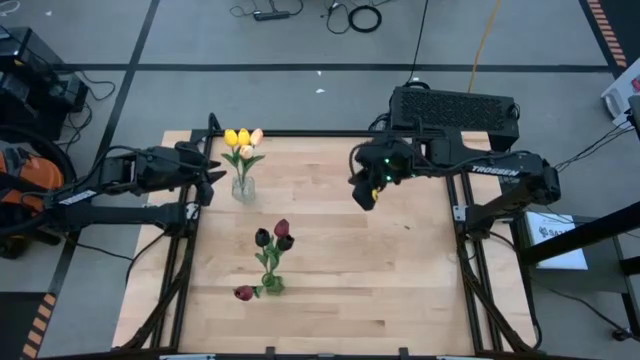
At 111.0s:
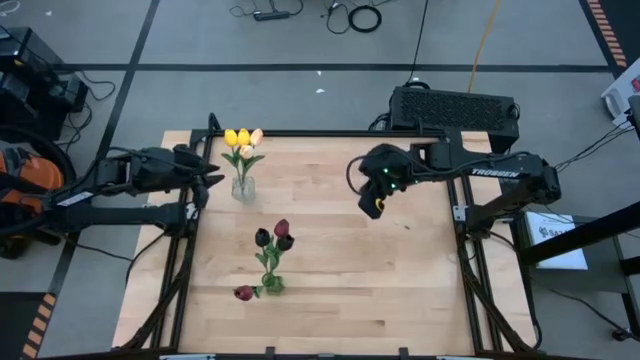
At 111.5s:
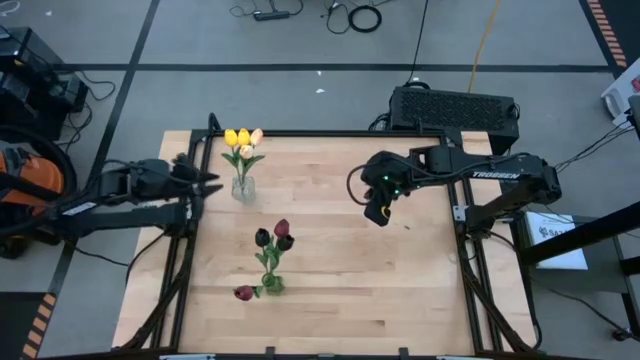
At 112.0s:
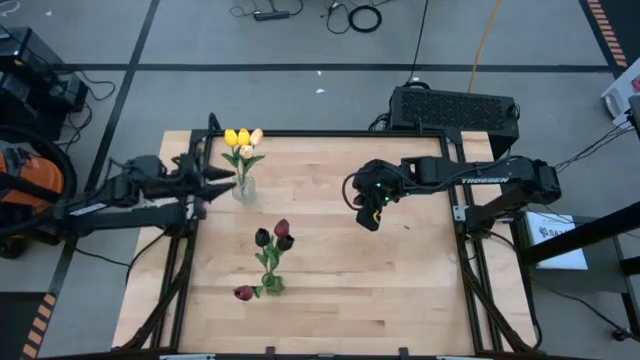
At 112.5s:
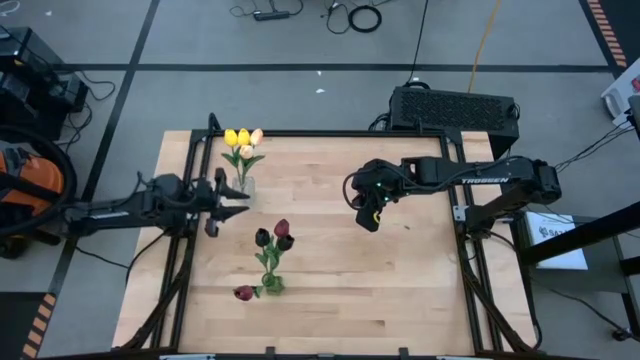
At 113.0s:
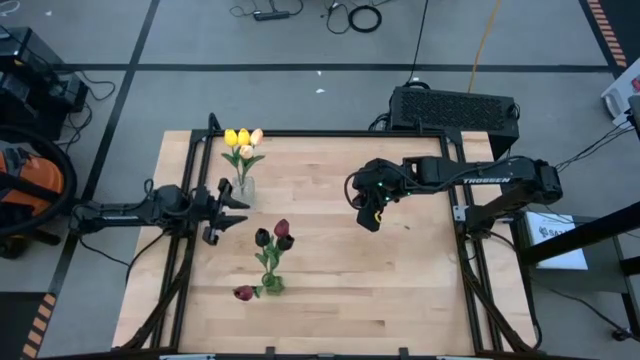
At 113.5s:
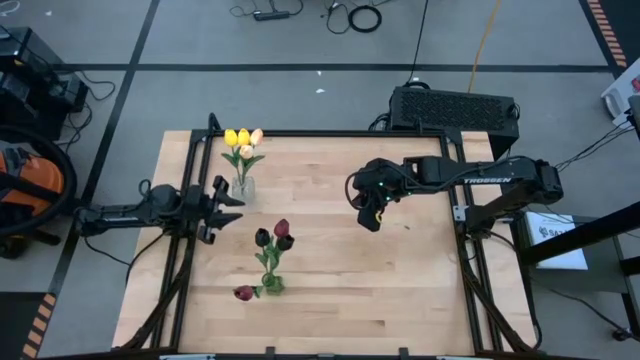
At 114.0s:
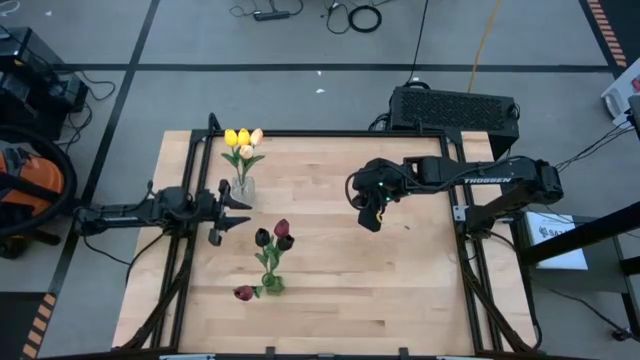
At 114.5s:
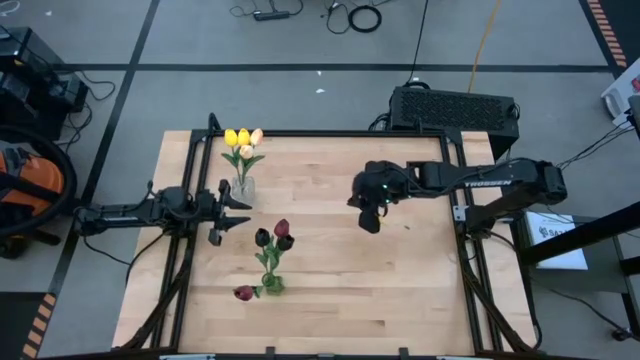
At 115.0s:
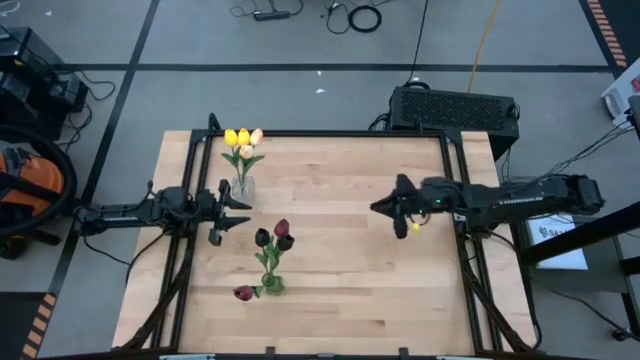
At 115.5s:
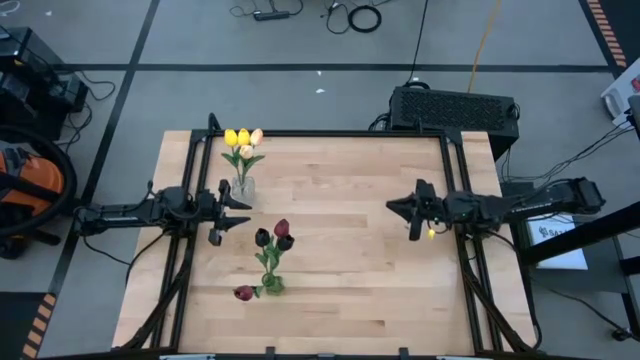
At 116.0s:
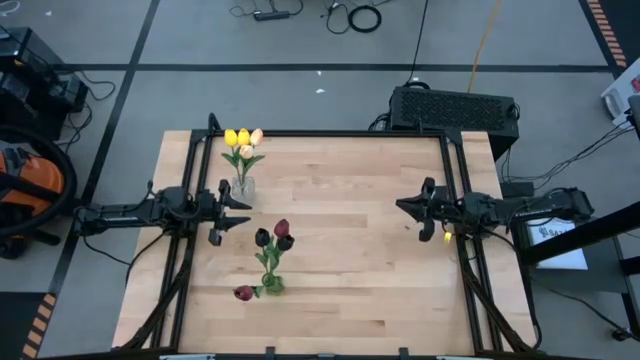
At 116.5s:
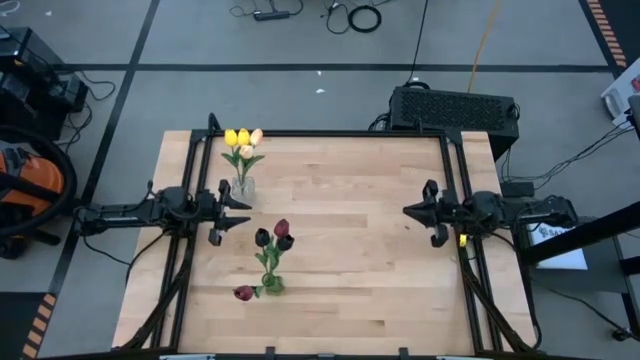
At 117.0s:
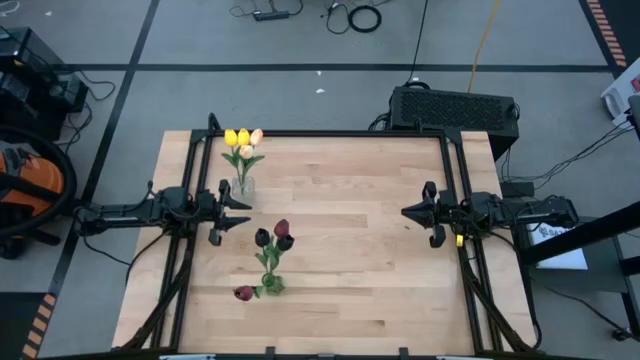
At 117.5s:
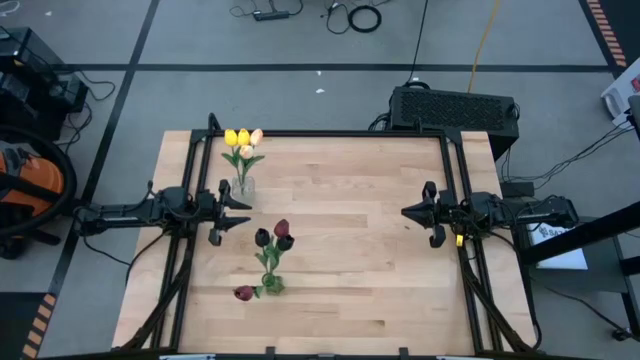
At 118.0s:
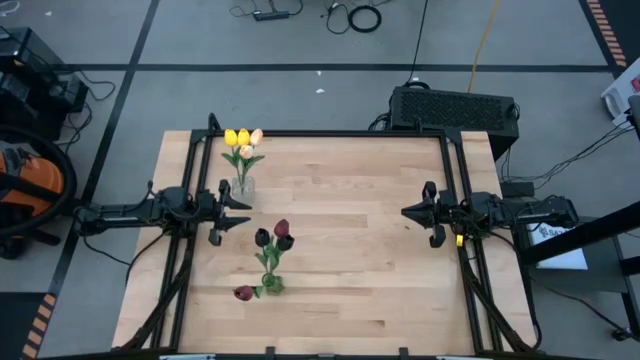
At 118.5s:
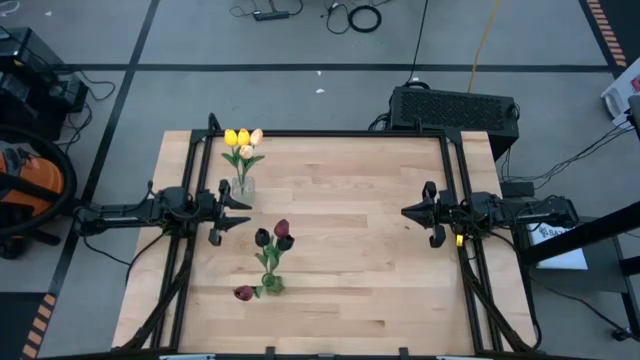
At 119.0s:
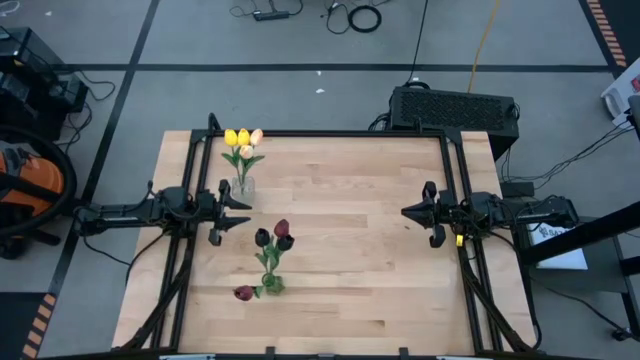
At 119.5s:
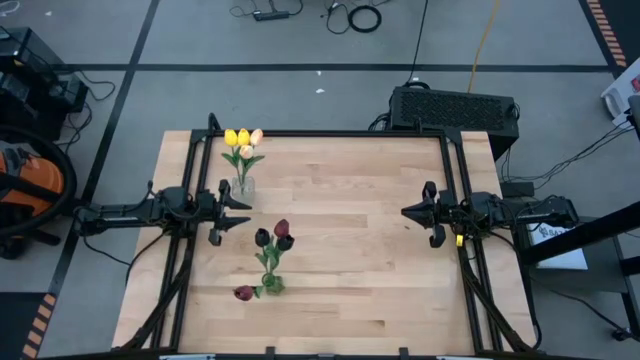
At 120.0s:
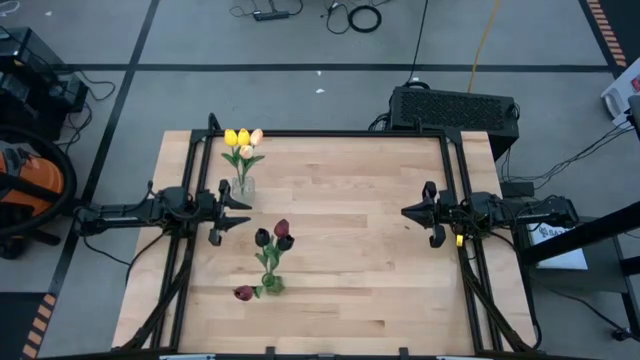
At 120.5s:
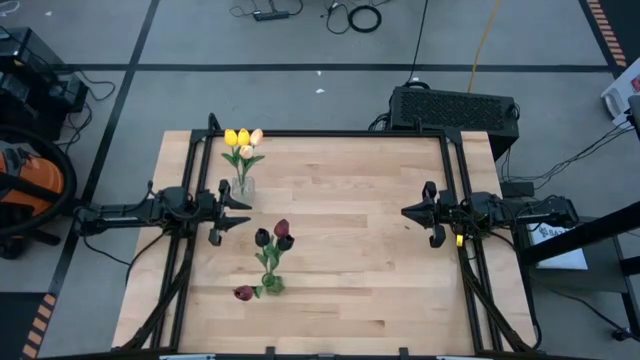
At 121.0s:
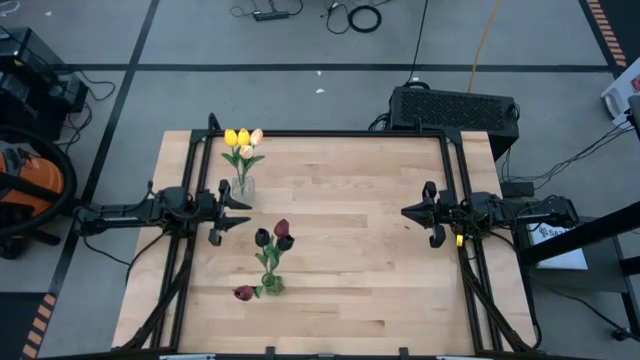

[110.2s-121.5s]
Task: Sort flowers into vase by color
Return to Home Position

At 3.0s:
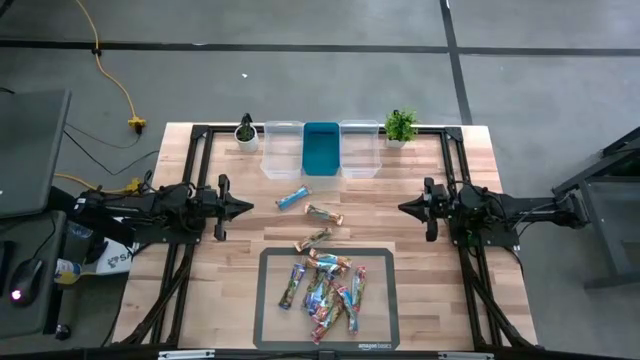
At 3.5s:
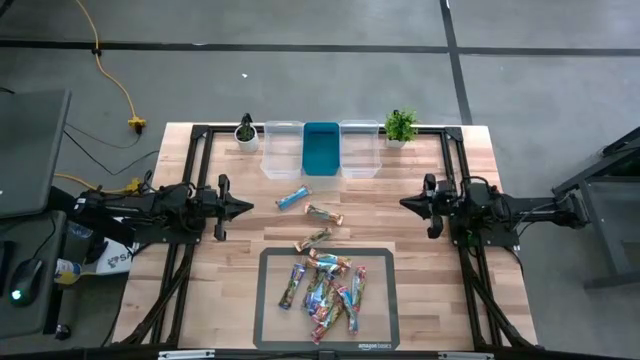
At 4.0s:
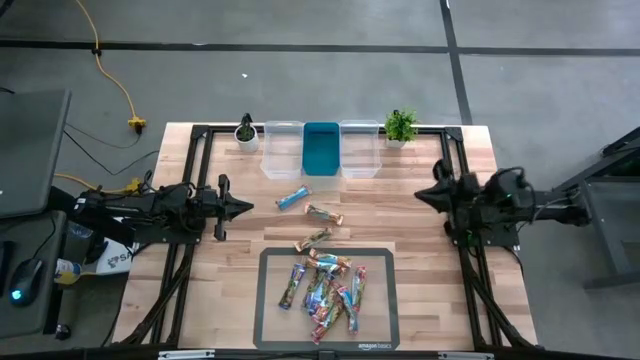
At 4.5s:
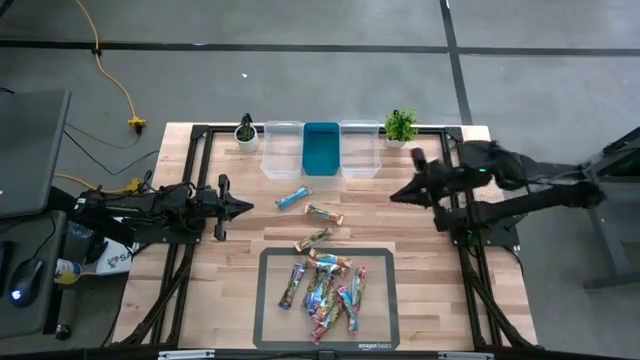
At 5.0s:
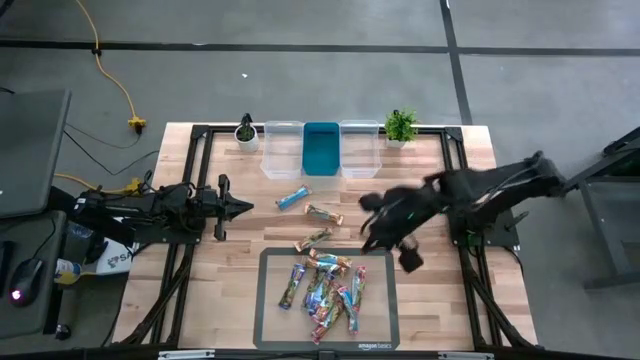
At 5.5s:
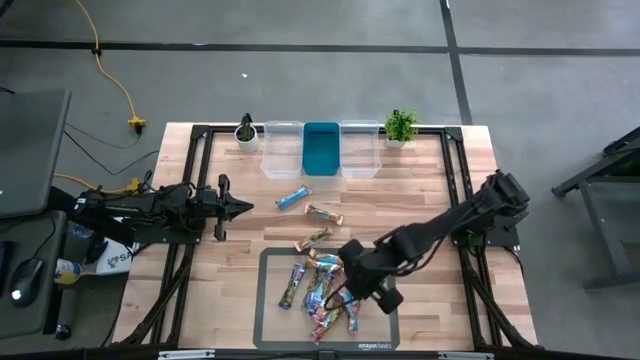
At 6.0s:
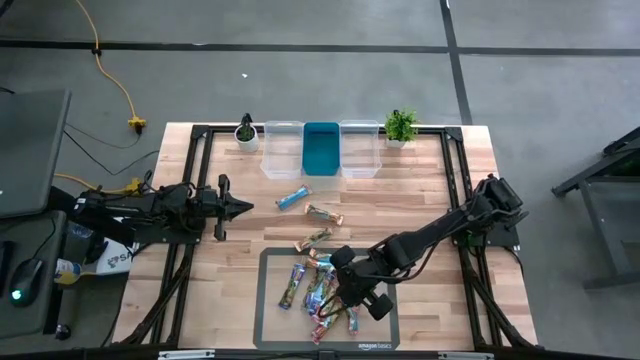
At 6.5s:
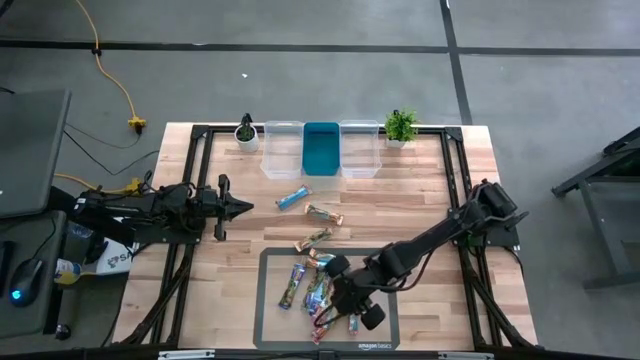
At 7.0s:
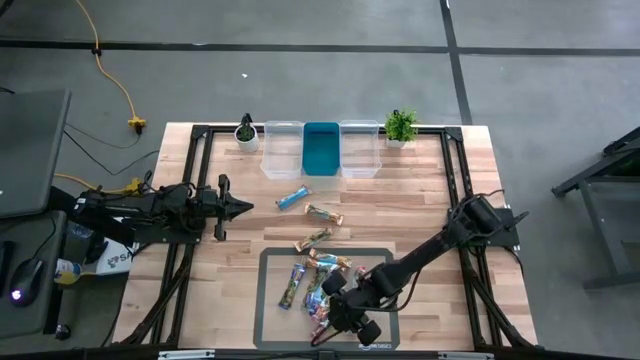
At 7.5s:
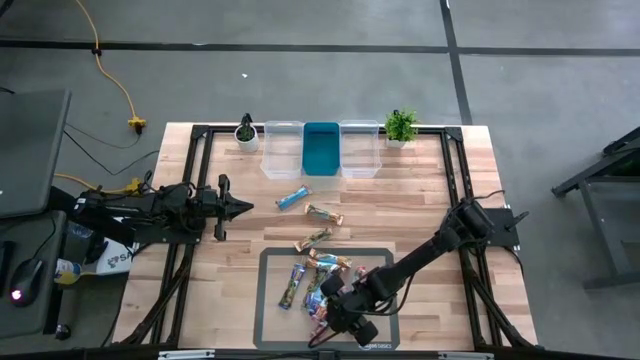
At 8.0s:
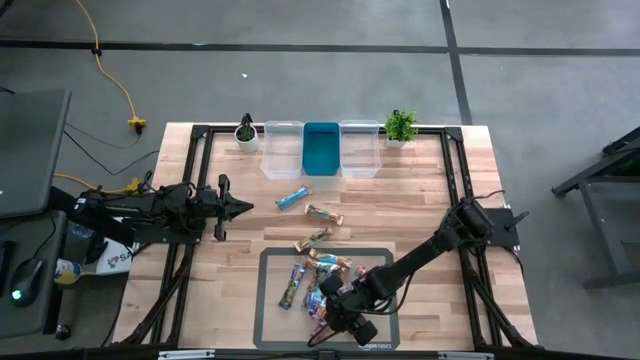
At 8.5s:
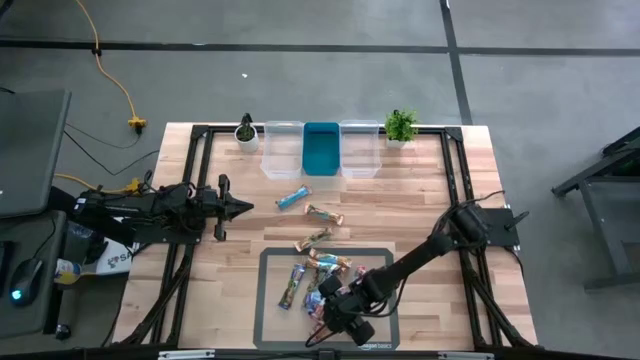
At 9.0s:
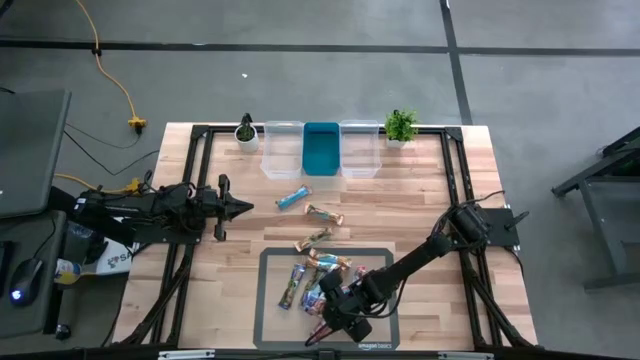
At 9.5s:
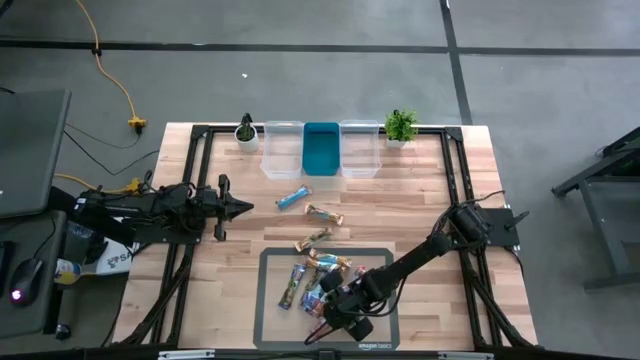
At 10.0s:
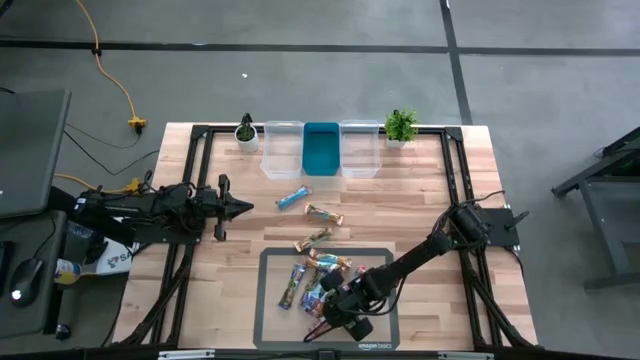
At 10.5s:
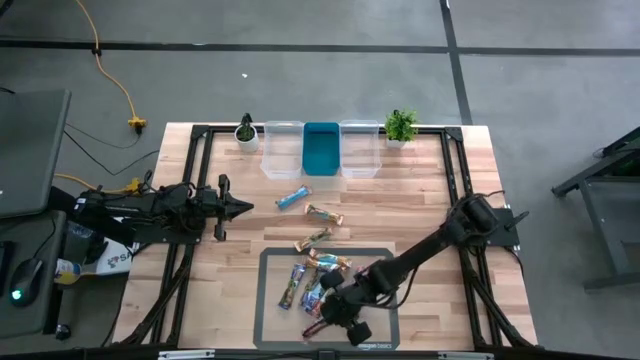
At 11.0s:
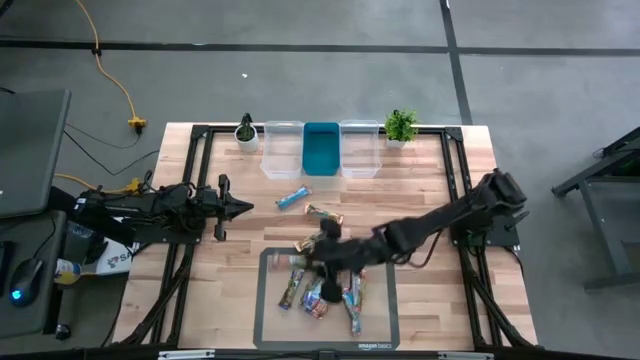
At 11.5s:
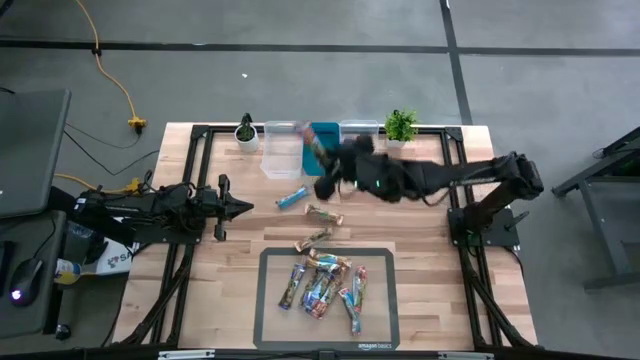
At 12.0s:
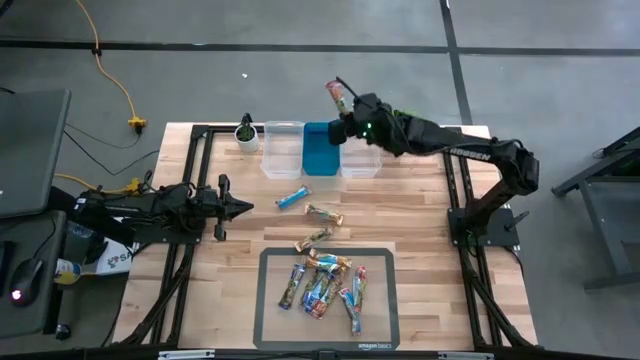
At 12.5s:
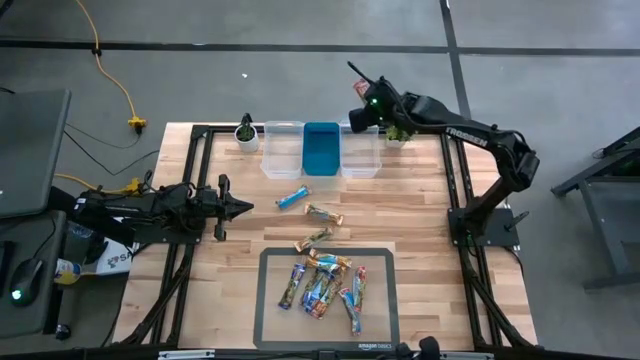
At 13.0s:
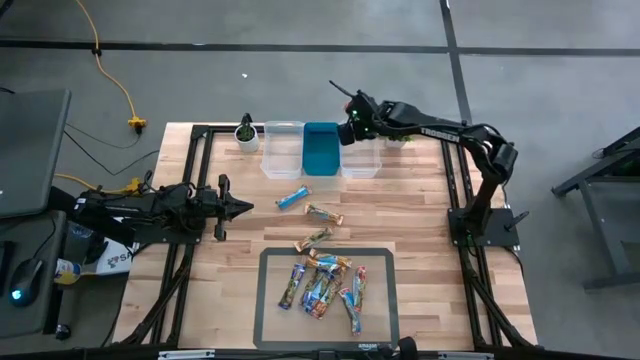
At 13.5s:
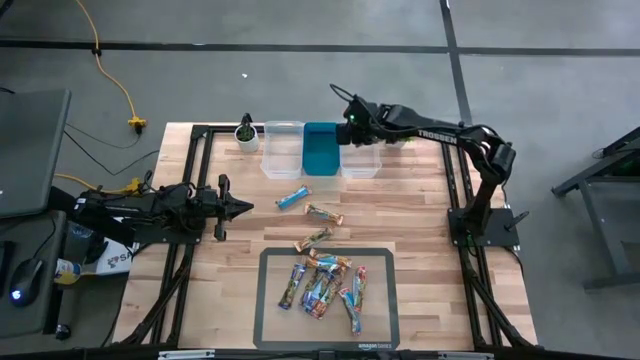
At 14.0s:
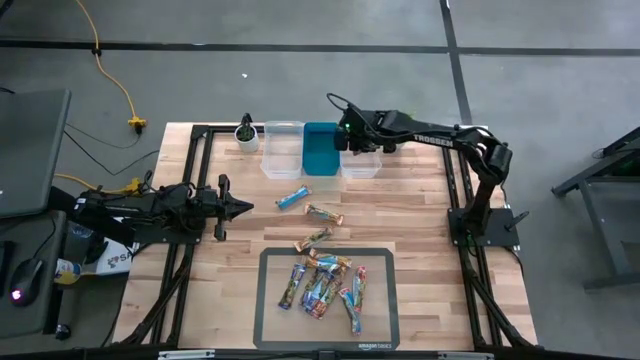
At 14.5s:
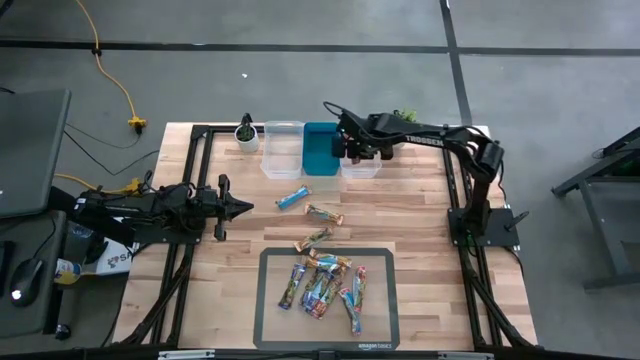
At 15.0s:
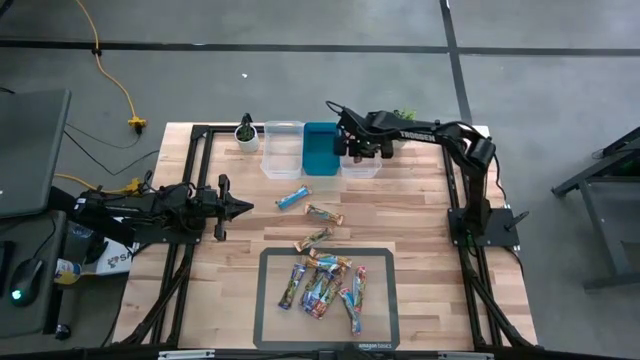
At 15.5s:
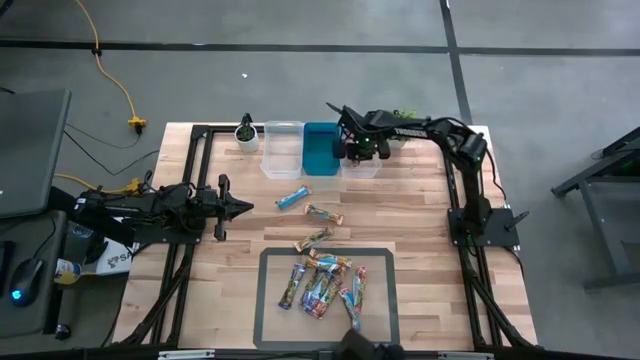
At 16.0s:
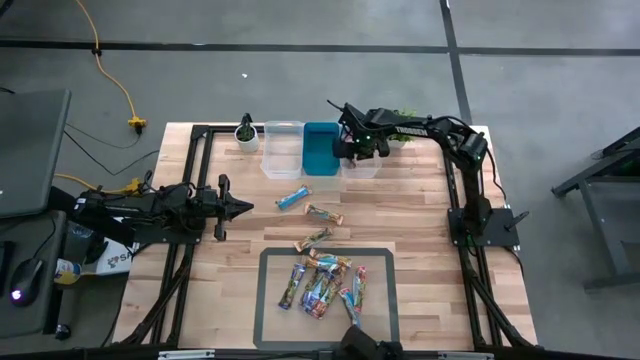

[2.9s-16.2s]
Task: Pick and place Granola Bars by type
Put the red granola bar into the right transparent bin
